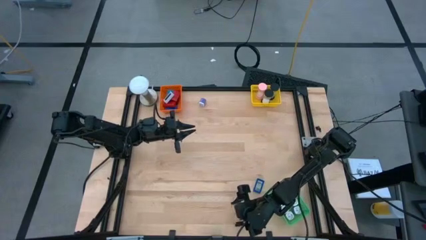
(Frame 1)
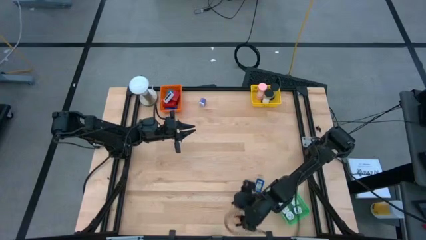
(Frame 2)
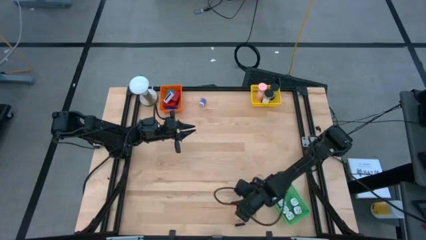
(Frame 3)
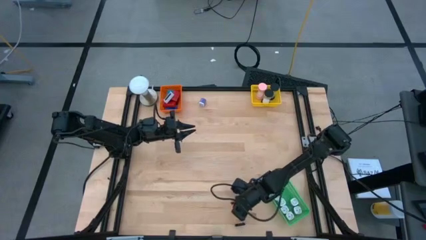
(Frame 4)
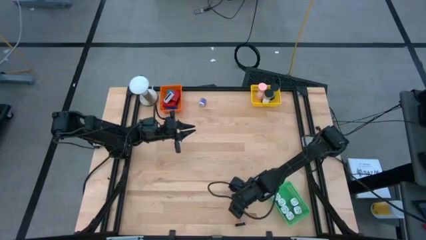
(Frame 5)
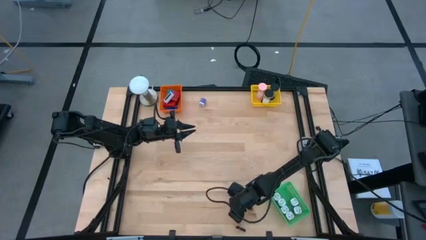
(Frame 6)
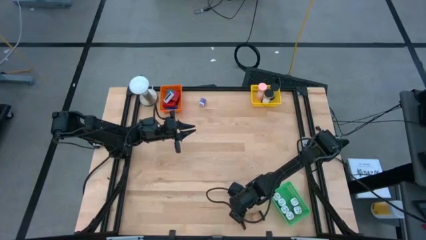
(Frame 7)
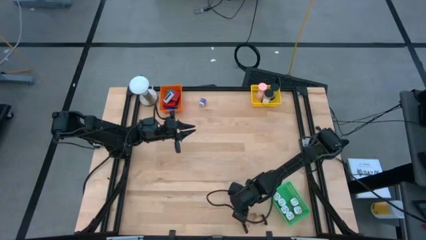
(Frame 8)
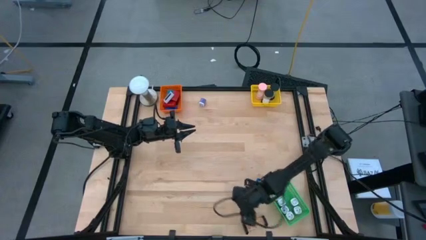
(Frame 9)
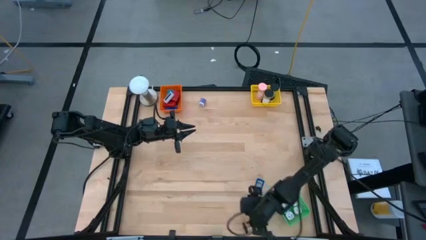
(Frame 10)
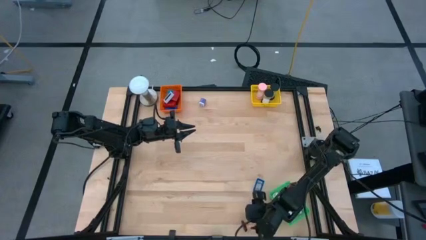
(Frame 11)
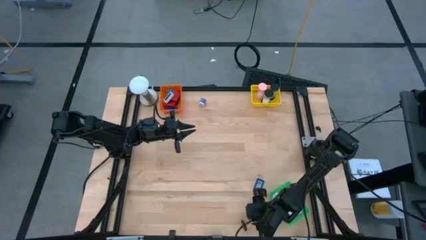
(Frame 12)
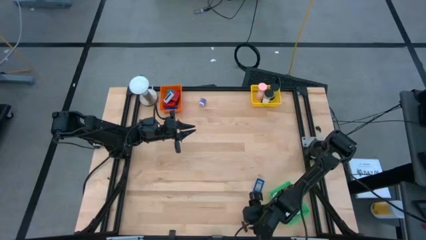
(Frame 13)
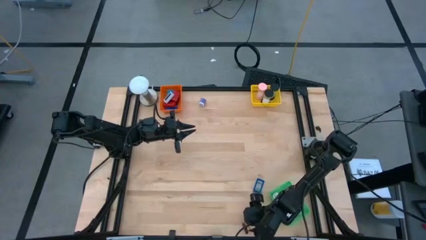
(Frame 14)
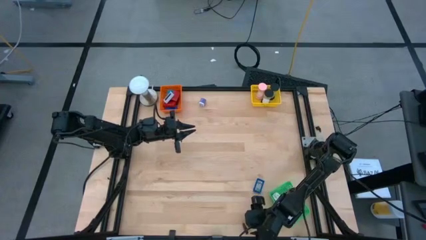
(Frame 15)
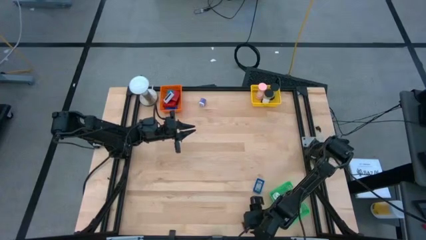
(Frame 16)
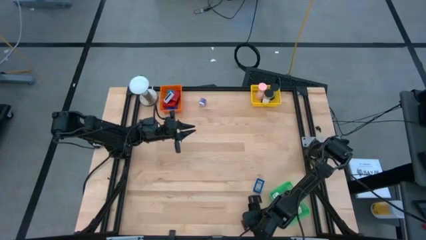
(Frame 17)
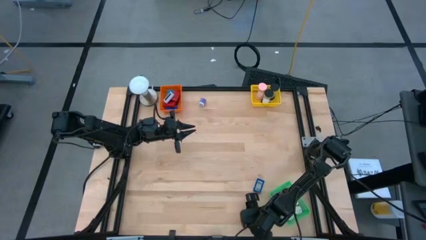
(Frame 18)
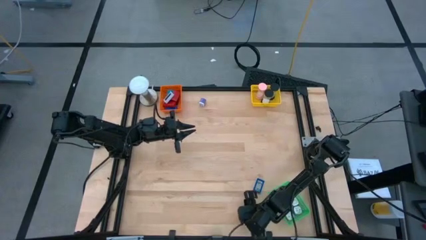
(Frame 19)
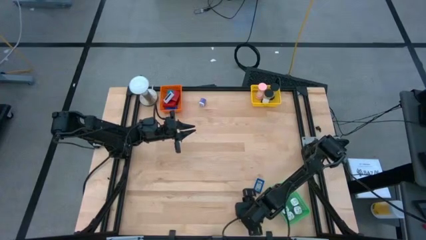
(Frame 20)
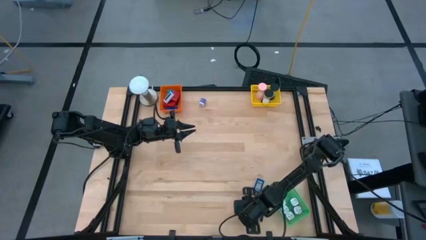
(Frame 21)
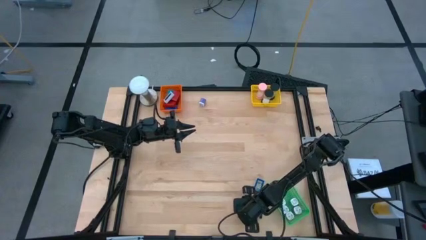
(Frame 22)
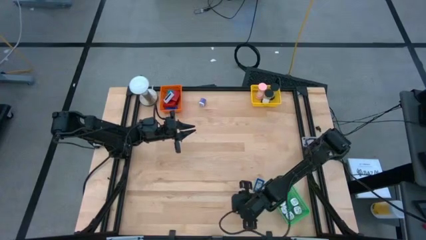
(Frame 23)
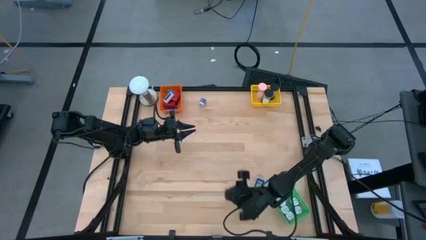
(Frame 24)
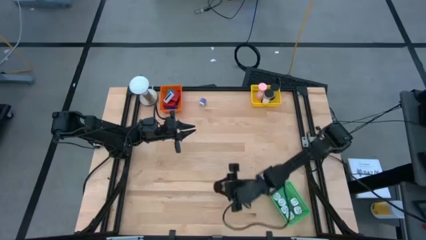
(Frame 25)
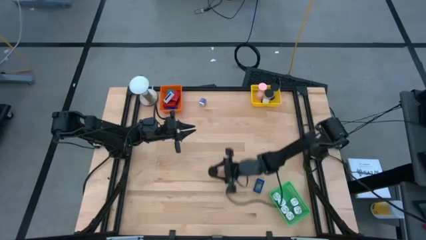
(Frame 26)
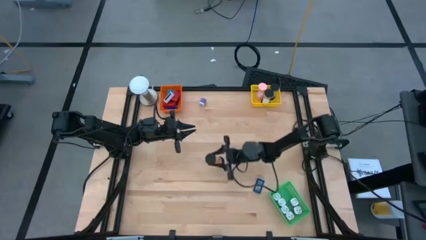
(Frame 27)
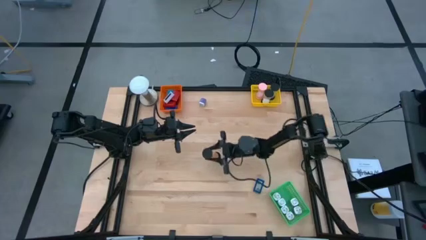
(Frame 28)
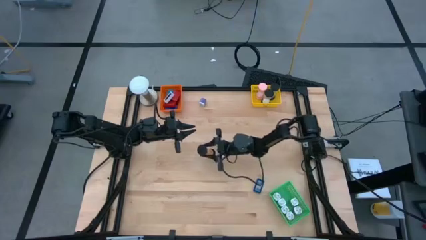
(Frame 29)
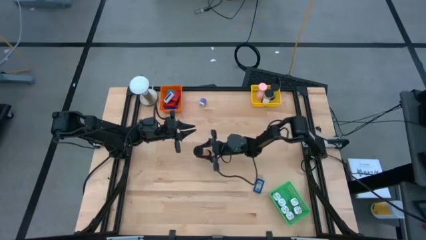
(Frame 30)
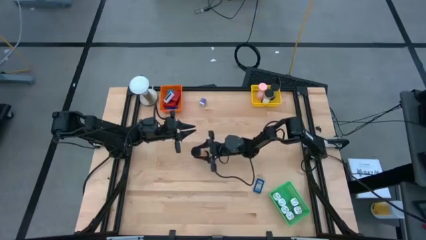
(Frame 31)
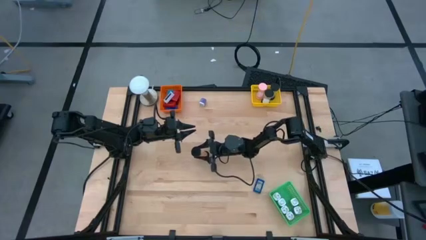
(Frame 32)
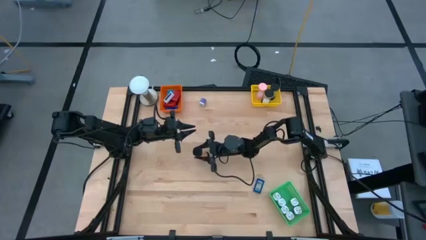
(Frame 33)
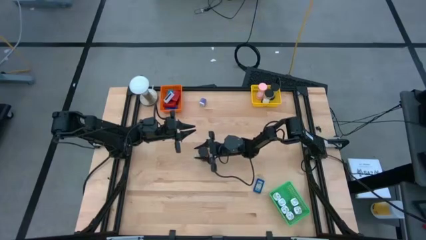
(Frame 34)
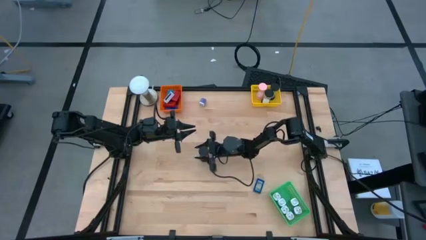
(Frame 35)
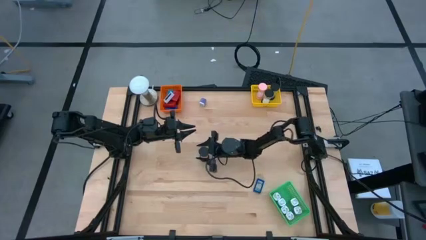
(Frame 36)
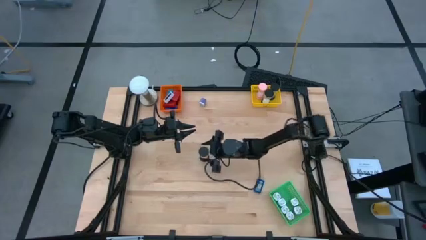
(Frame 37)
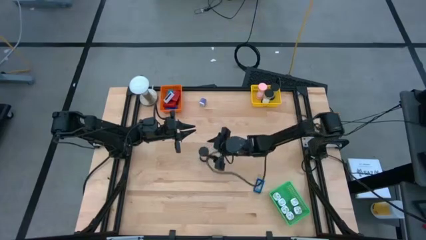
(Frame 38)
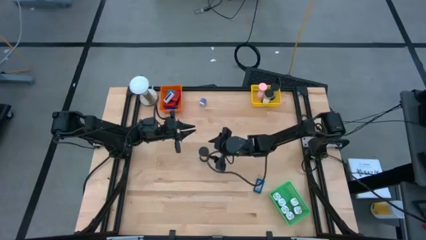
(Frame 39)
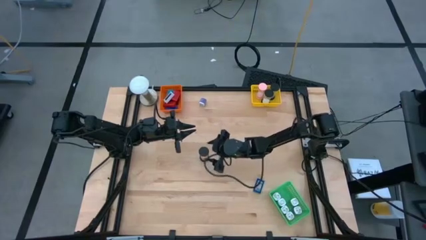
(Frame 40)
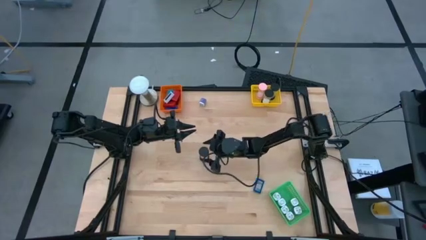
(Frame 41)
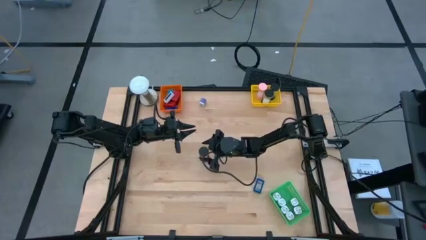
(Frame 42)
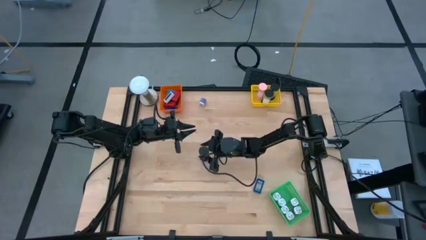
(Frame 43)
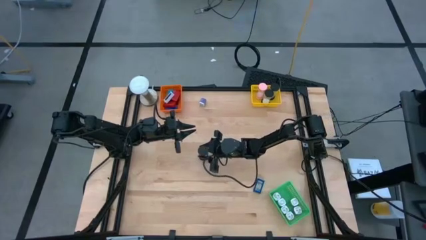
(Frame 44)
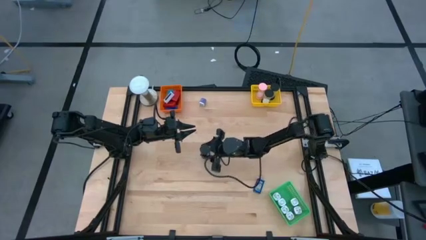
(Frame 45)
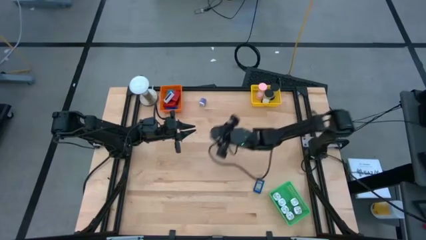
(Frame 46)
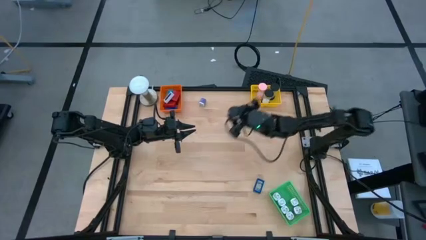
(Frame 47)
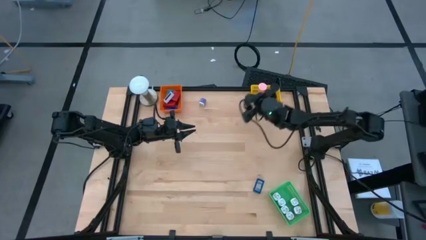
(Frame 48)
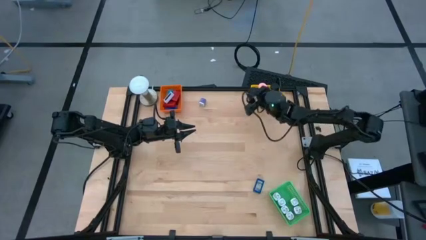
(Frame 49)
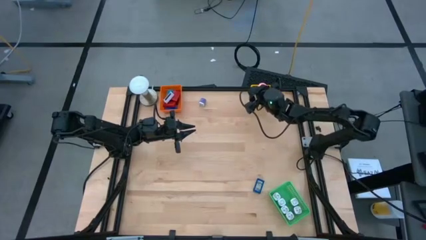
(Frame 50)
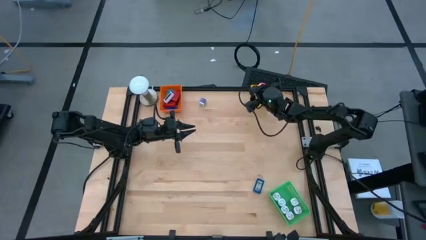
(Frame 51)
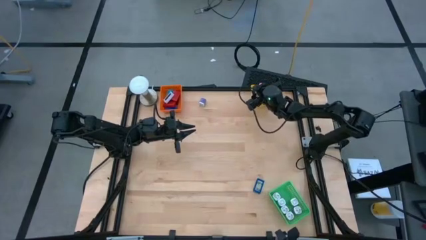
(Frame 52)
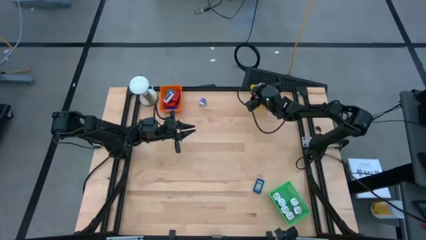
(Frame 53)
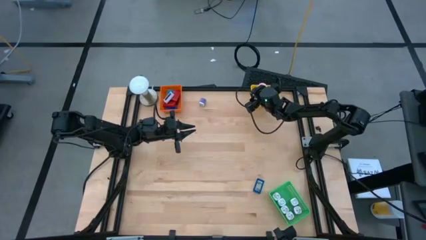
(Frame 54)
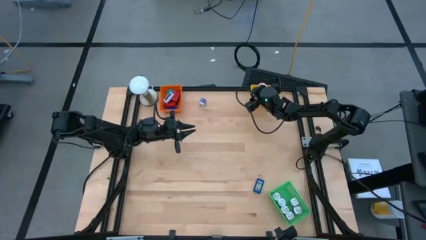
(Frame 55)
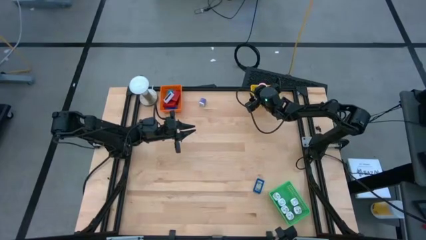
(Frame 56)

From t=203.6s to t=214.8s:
Task: Pick & Place Office items
Put the orange hourglass into the yellow bin

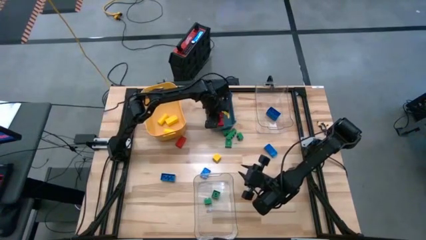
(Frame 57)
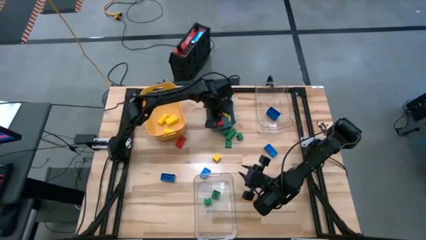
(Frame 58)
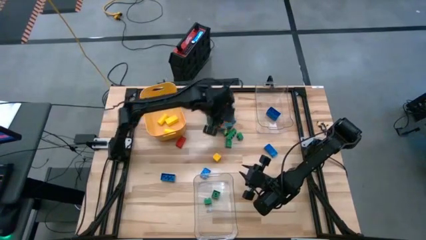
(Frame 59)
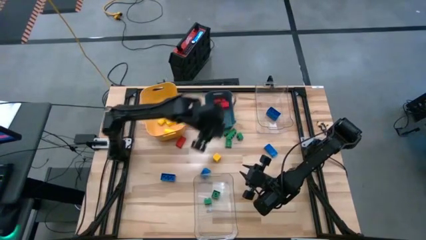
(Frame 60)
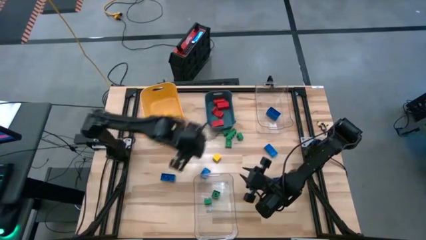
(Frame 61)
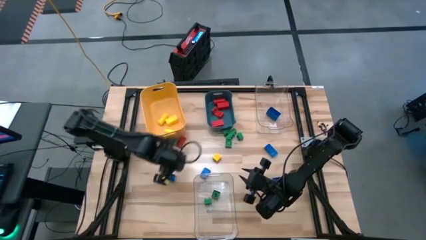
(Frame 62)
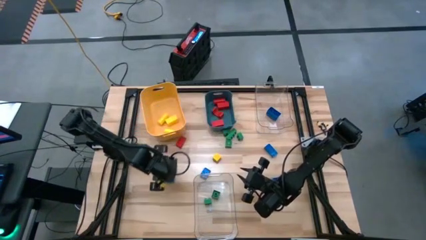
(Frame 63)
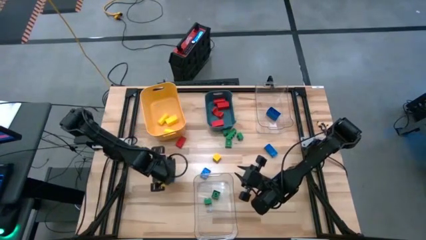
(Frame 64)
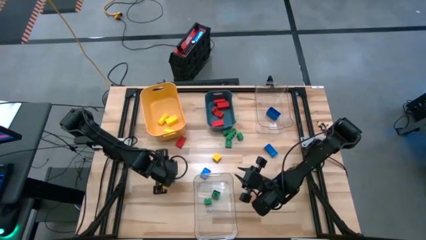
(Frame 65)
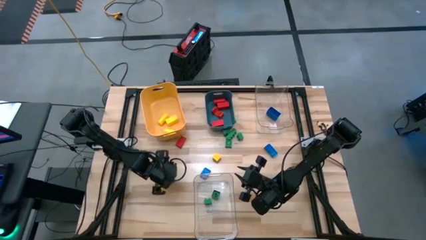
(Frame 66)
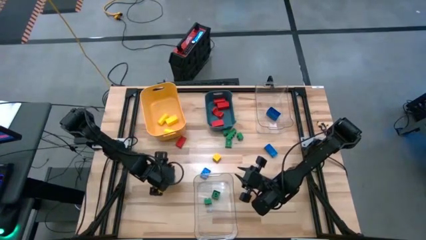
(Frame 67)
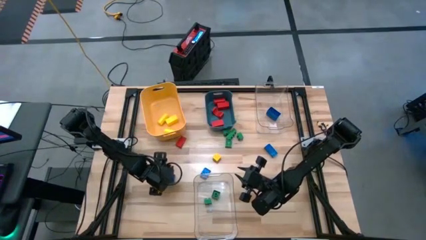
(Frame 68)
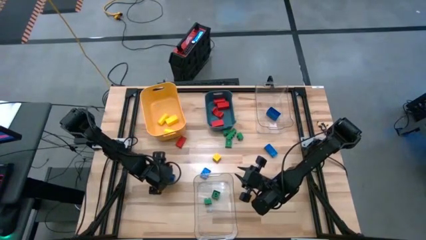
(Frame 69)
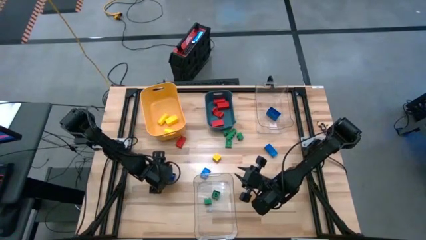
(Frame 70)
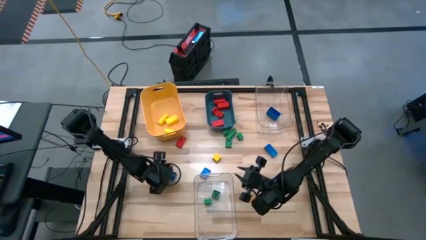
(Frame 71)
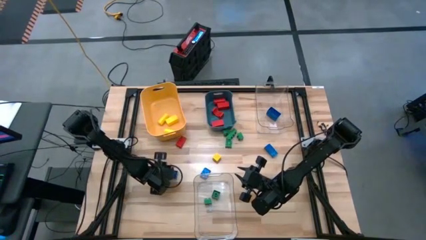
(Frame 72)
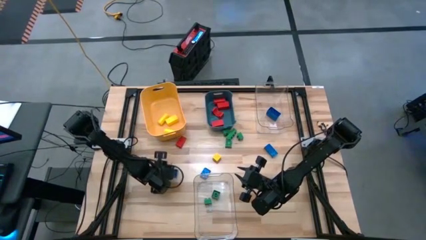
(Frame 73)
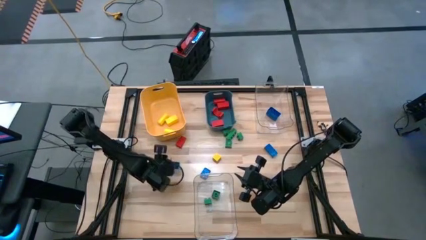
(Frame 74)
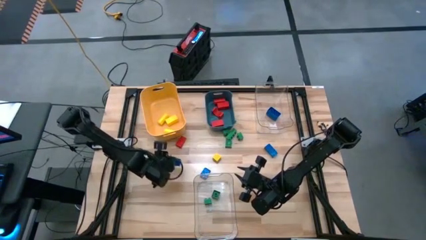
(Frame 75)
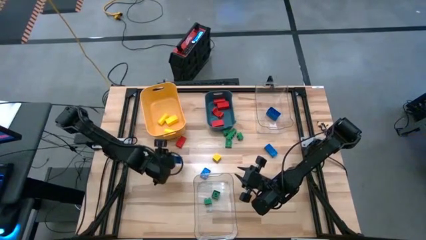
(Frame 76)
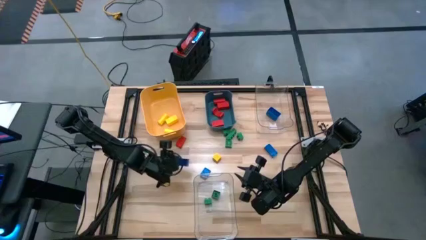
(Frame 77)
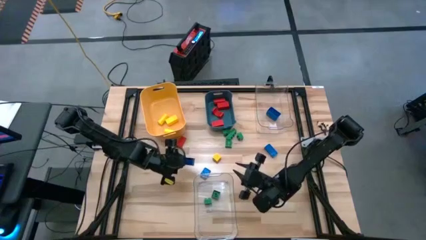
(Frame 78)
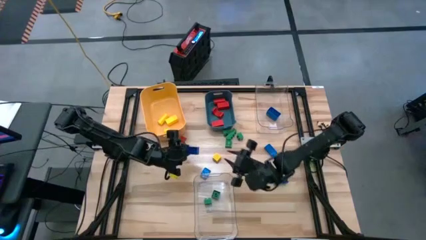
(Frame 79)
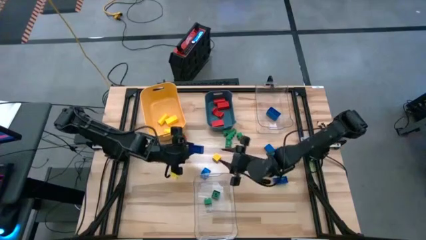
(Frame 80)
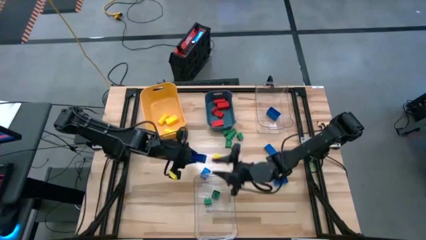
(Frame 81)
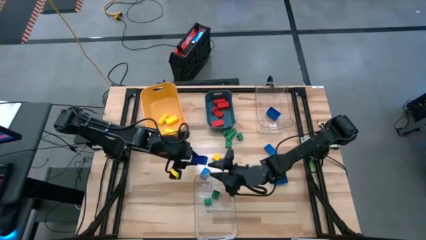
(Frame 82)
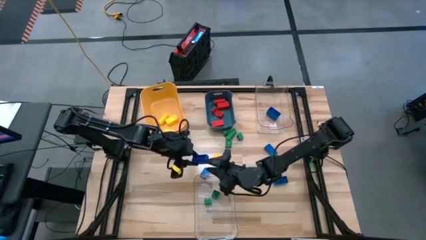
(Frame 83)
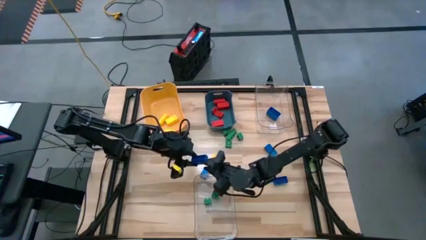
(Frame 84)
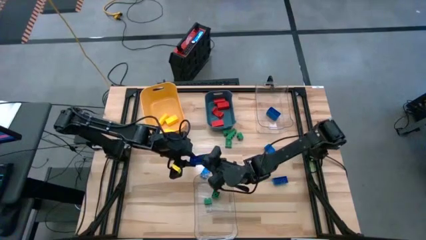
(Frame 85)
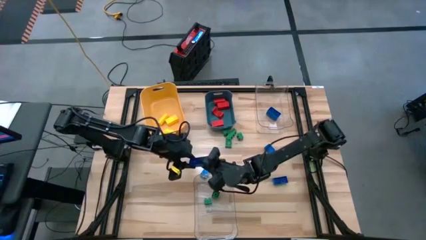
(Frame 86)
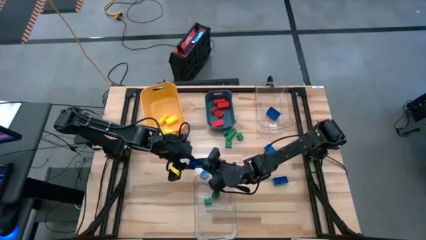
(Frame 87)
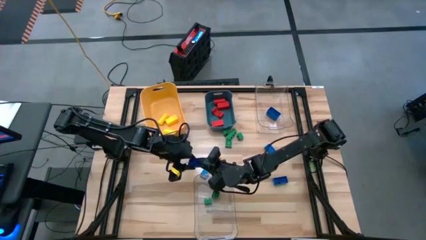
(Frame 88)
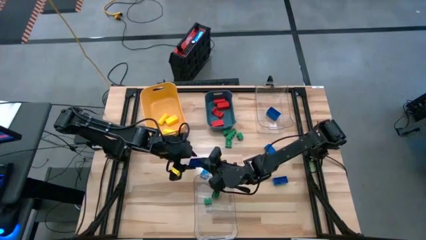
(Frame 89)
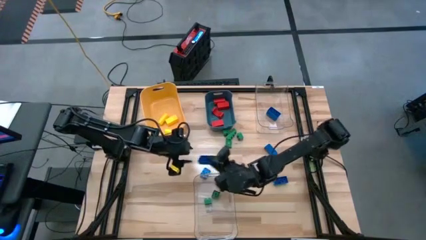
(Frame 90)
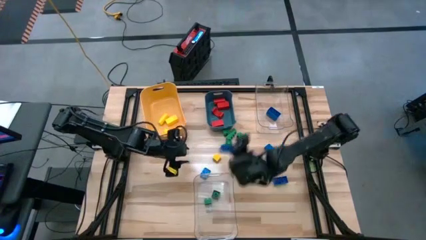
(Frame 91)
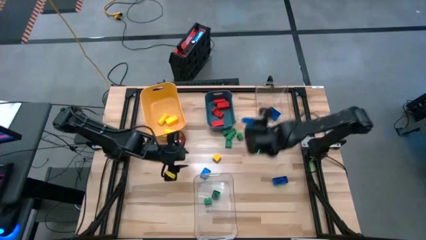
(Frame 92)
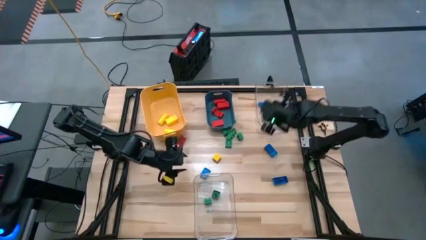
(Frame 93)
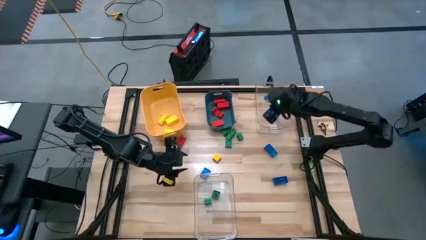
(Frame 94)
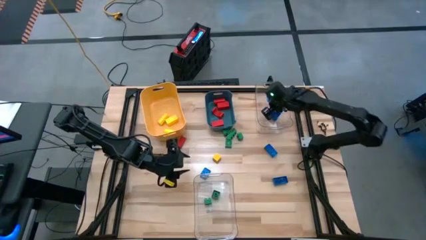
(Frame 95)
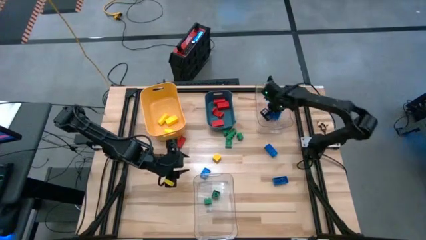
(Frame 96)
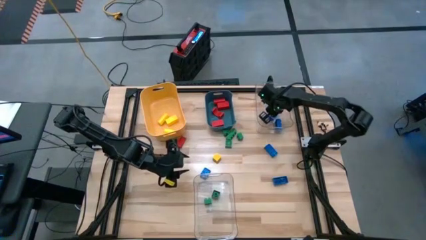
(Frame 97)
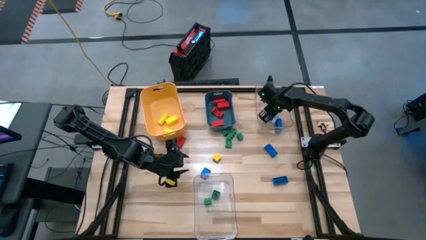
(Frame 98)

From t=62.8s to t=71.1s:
Task: Sort blocks
Put the blue game piece into the top transparent bin
